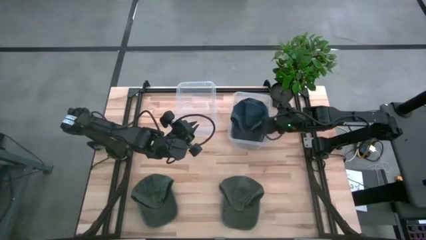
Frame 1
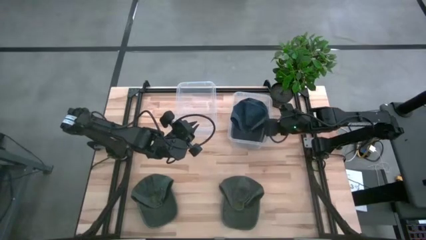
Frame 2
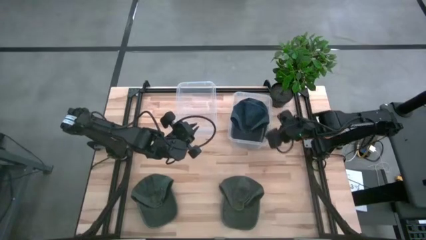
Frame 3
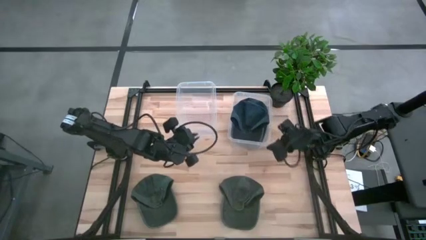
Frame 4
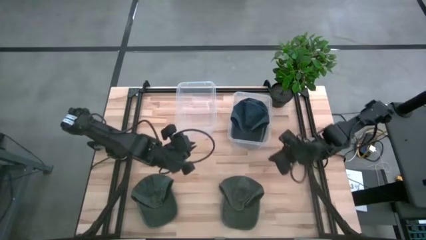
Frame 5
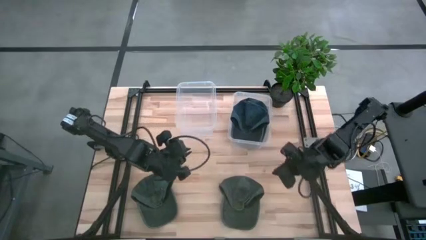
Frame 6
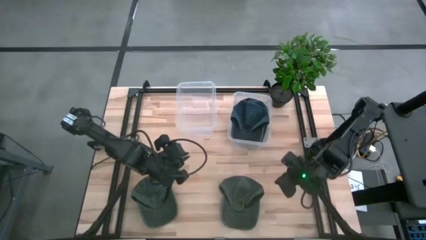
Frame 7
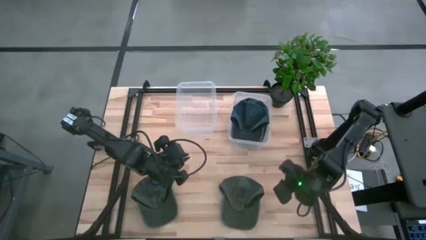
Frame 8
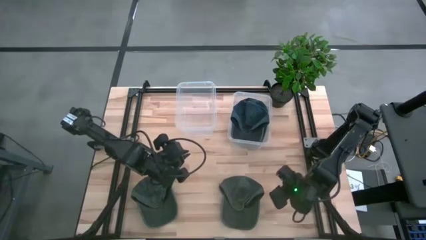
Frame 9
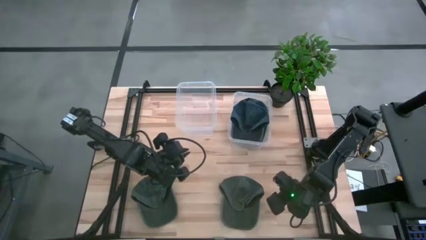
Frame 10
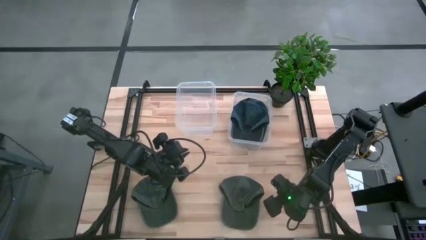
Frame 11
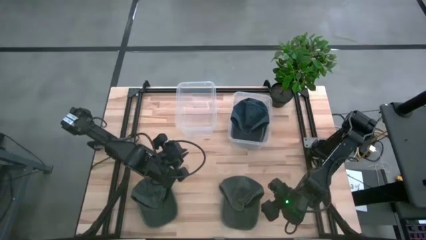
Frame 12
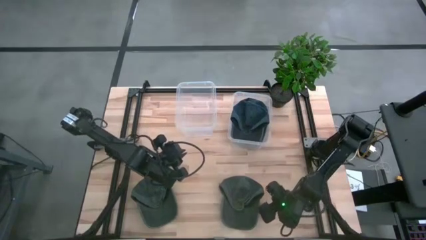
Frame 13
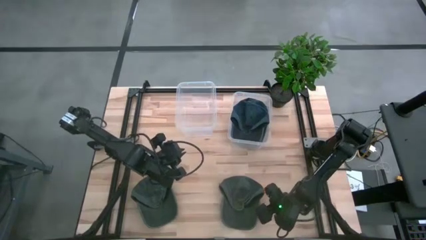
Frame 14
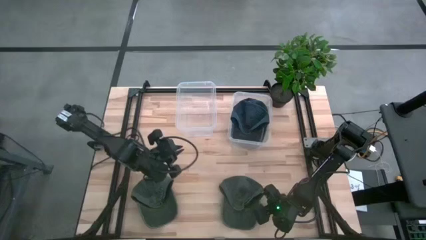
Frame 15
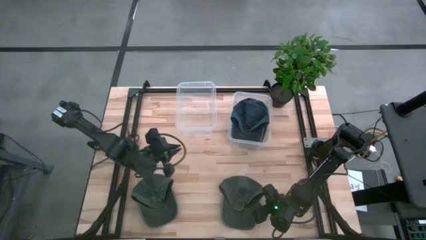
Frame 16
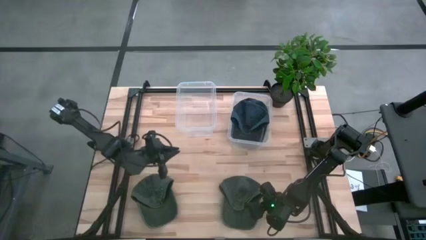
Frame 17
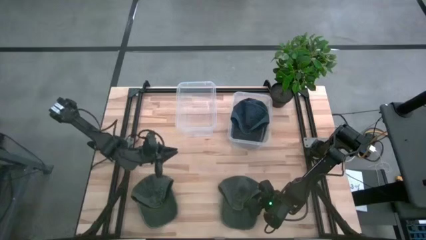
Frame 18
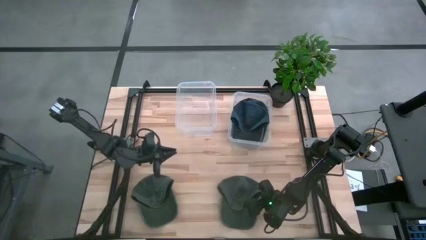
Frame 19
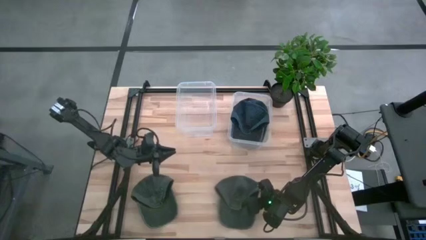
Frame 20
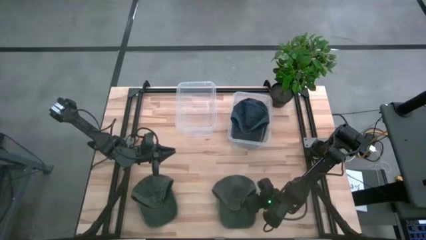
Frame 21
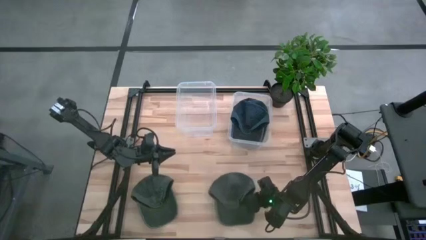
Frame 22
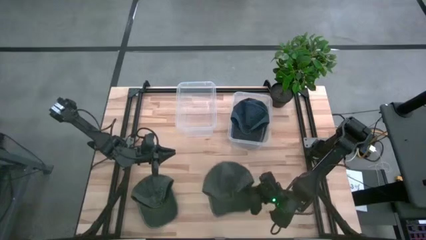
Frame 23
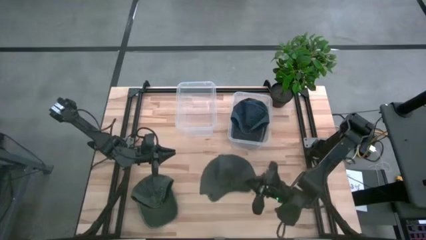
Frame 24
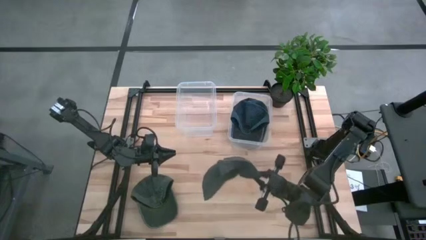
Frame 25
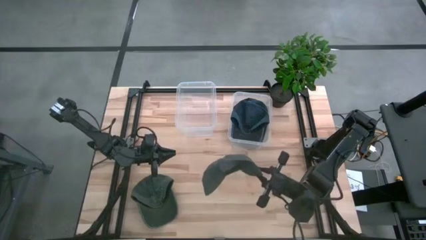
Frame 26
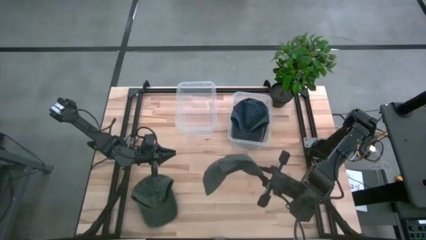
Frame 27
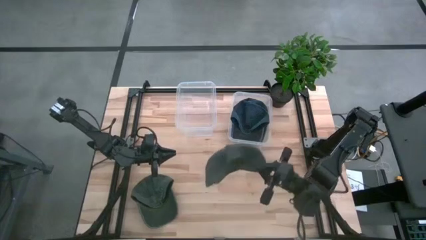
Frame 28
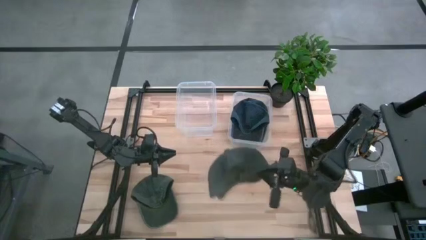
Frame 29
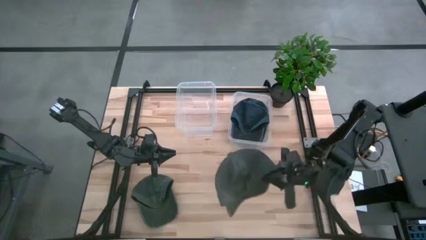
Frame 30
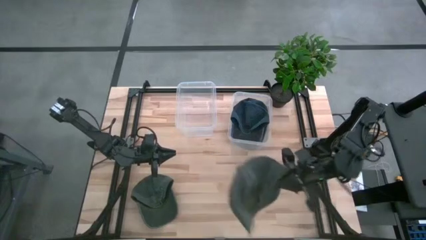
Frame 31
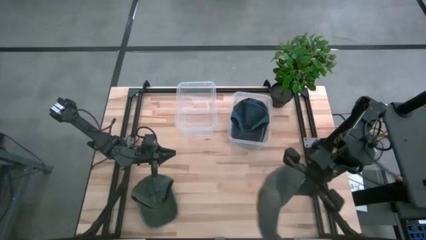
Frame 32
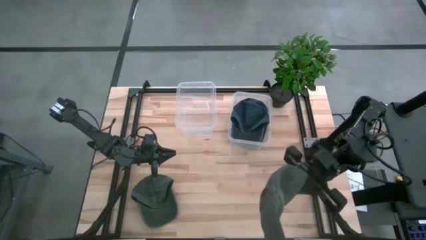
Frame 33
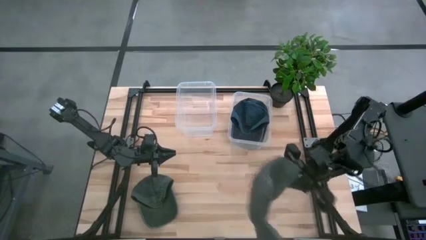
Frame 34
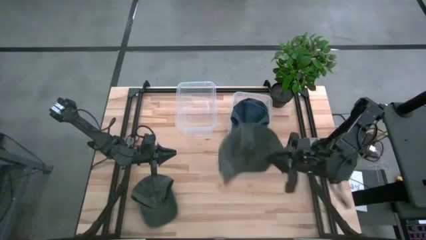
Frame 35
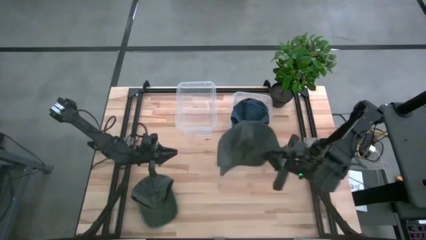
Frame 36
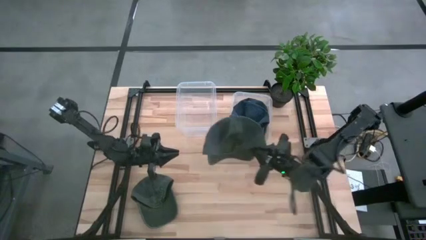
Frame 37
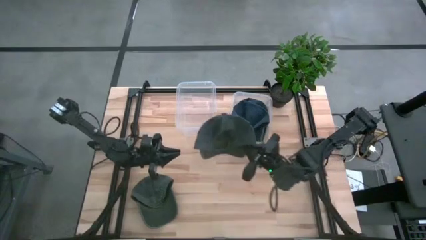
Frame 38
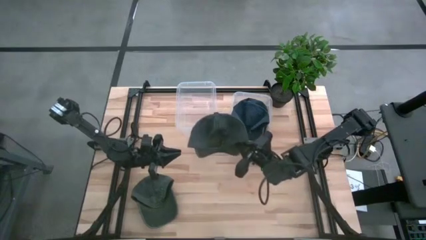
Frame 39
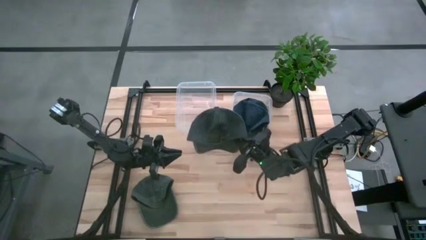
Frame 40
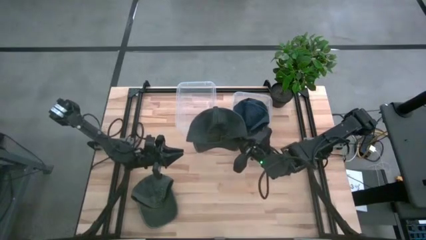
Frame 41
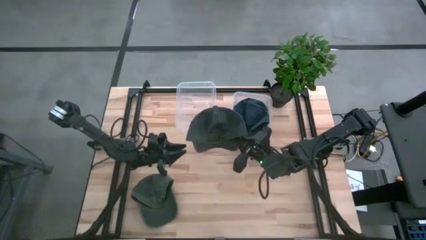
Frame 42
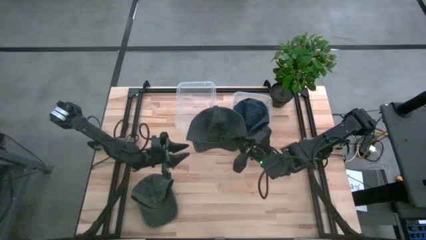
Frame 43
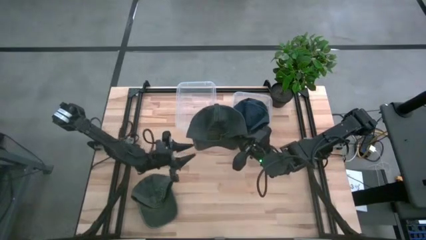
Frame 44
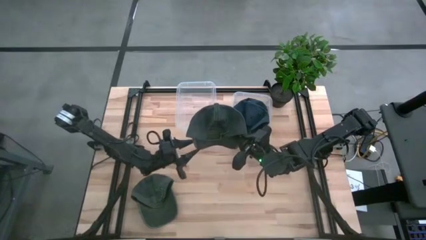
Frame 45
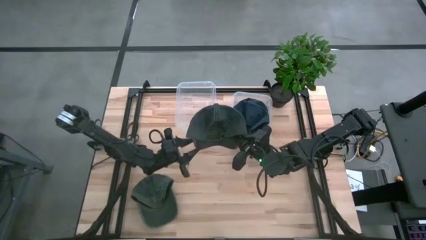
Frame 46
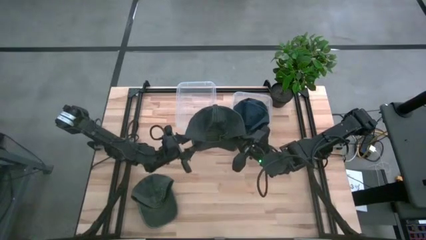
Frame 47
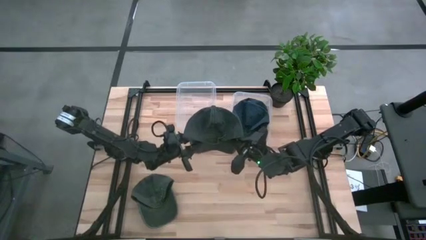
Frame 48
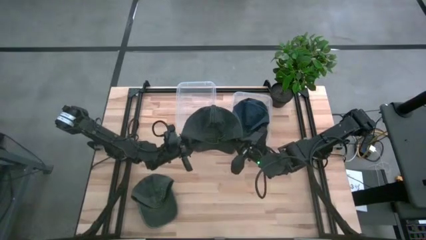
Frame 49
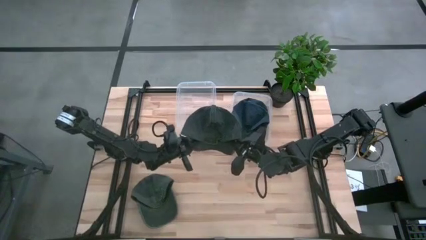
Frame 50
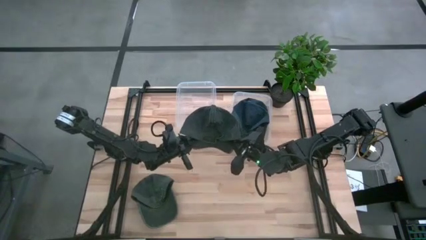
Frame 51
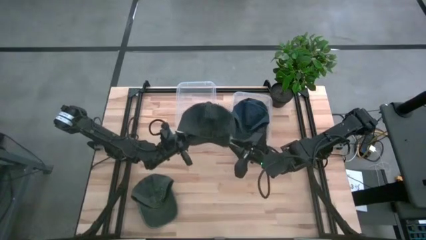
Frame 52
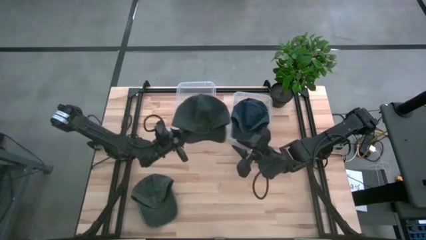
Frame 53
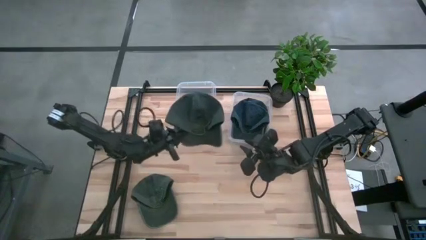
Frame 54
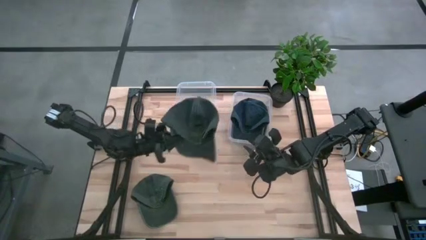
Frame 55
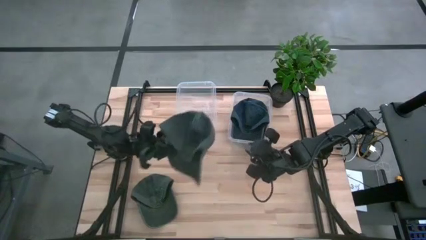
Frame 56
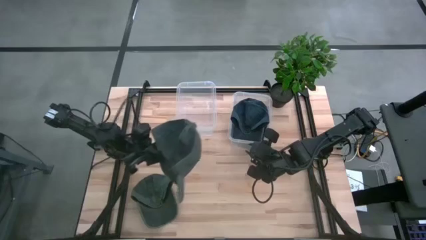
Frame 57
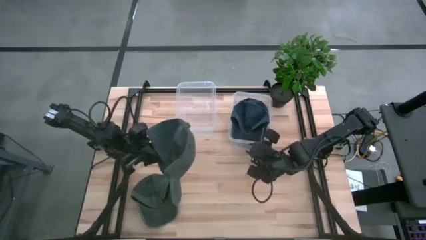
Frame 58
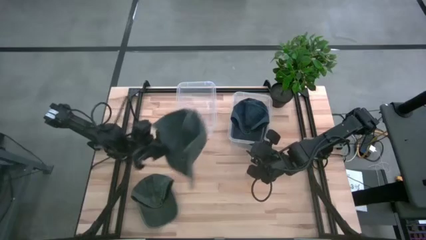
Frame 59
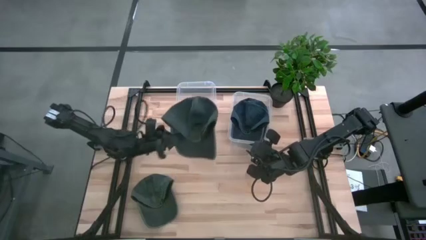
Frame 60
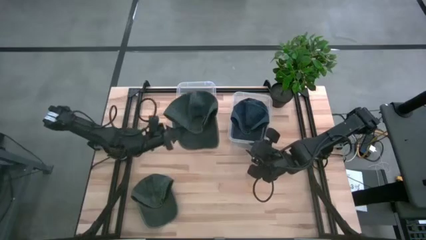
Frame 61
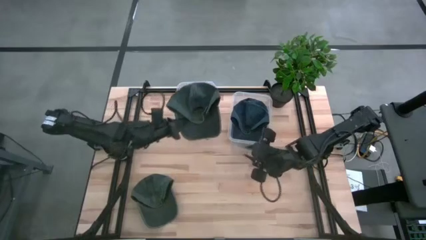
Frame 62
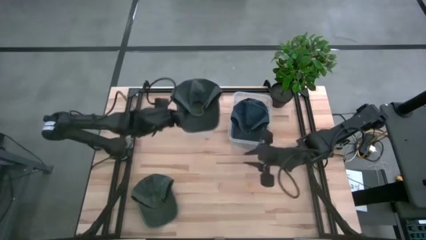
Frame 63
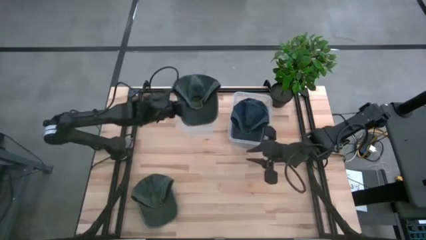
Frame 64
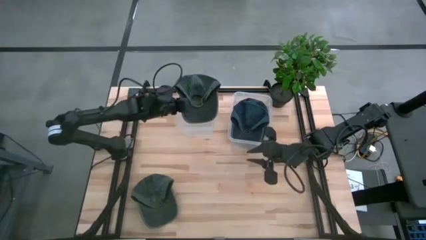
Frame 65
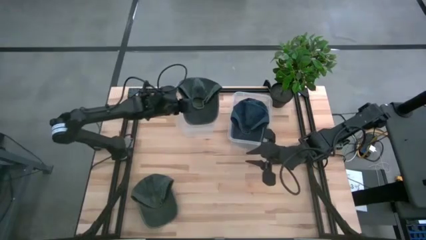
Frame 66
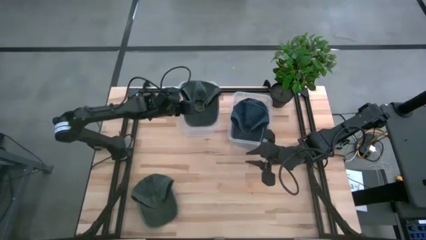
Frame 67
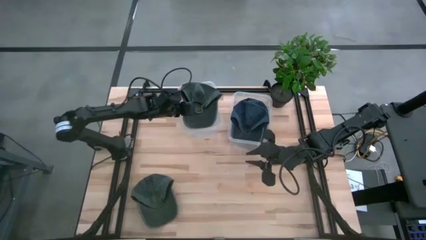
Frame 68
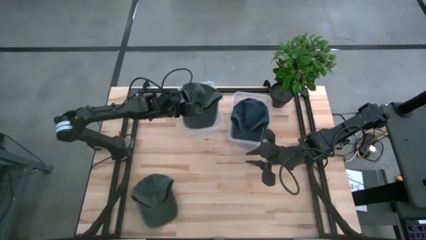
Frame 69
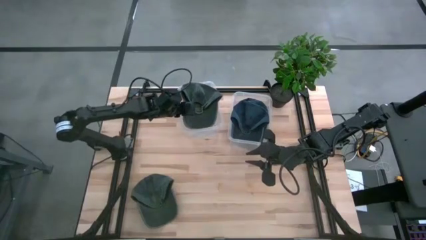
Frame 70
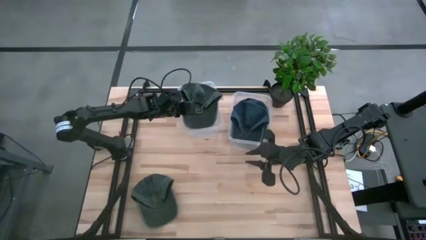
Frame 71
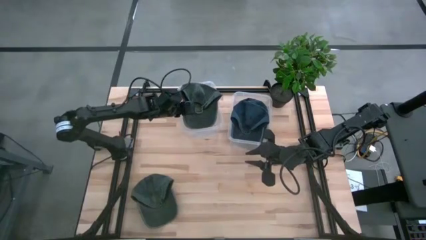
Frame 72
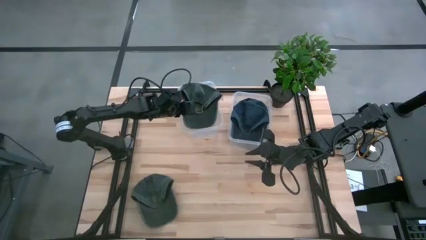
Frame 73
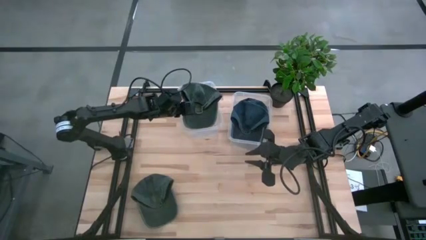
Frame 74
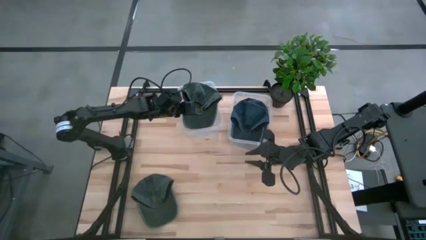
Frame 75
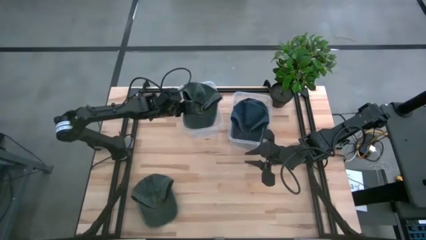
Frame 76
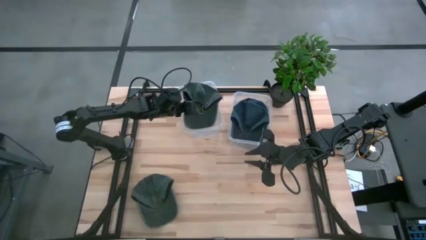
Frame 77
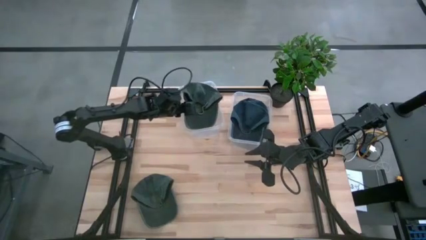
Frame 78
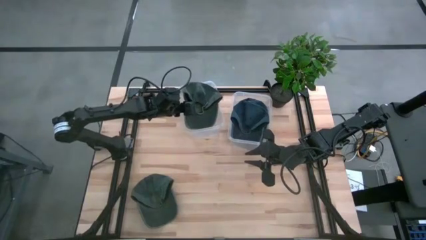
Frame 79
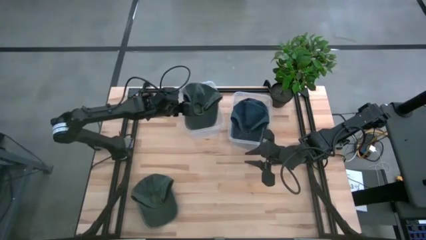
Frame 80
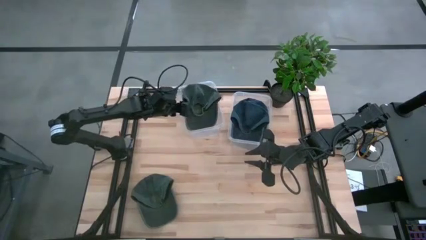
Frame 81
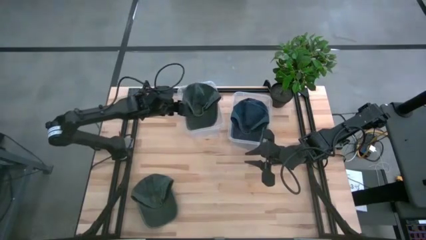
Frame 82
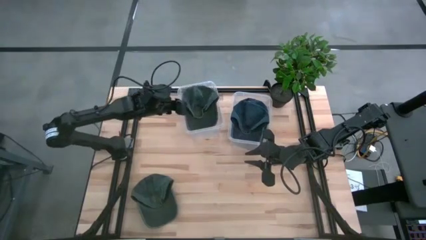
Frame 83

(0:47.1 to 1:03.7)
Task: Pick & Place hat
Put the right green cap into the left transparent bin
